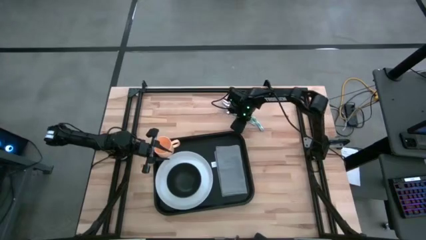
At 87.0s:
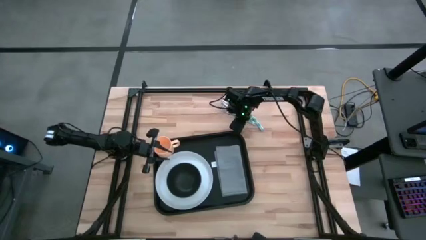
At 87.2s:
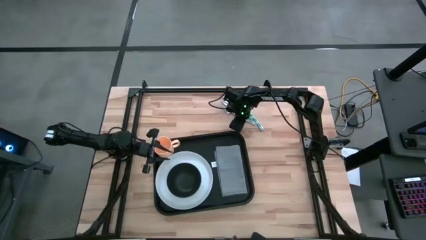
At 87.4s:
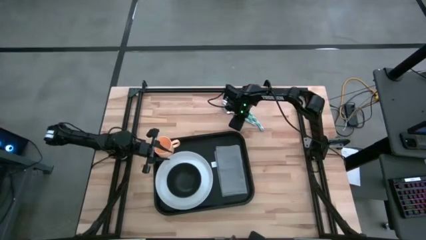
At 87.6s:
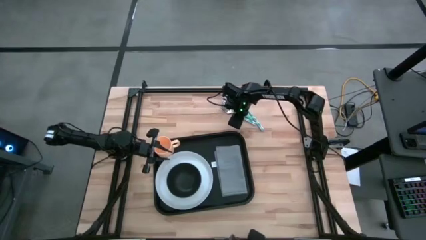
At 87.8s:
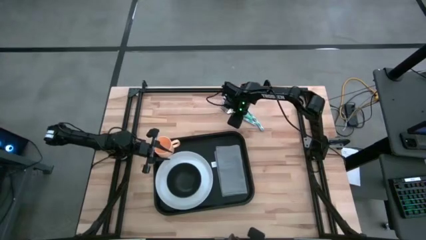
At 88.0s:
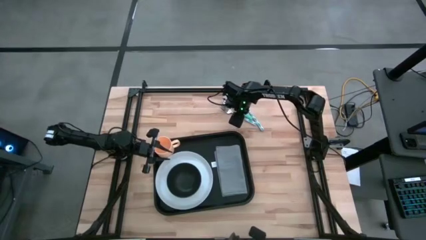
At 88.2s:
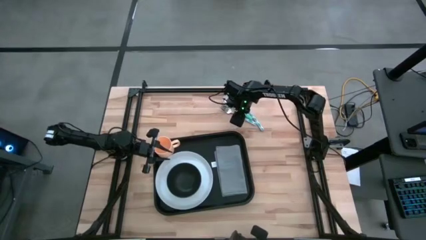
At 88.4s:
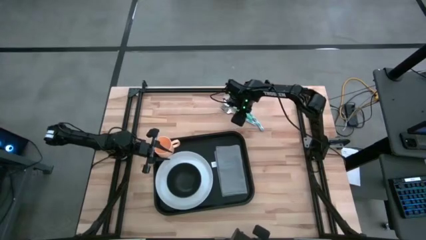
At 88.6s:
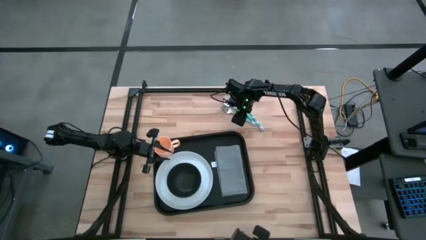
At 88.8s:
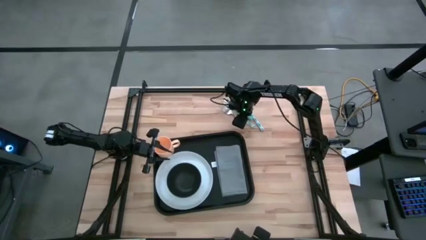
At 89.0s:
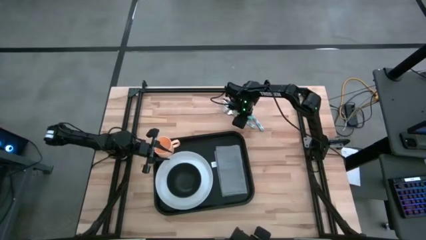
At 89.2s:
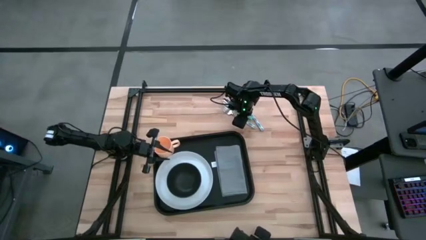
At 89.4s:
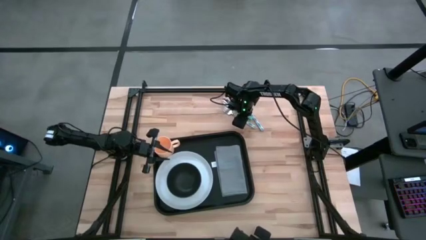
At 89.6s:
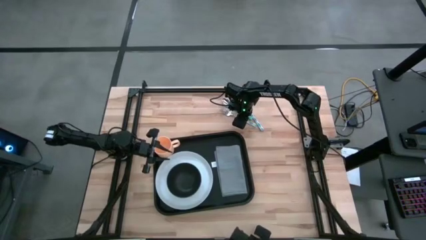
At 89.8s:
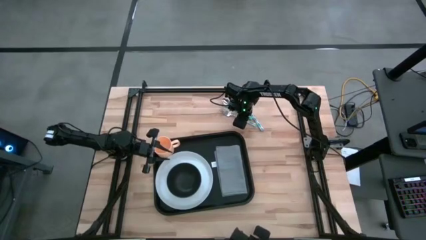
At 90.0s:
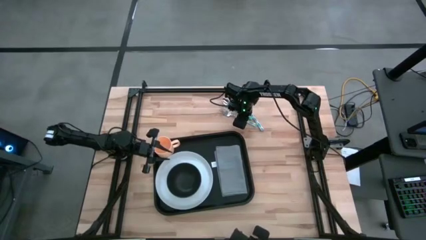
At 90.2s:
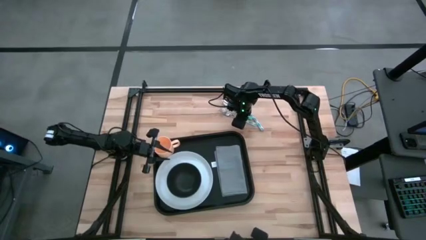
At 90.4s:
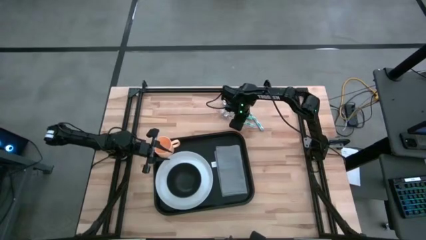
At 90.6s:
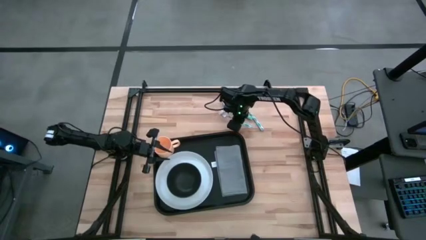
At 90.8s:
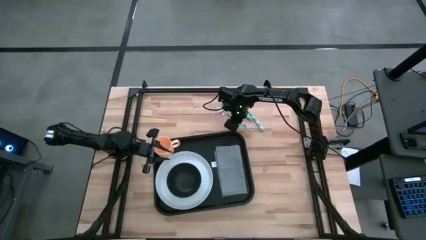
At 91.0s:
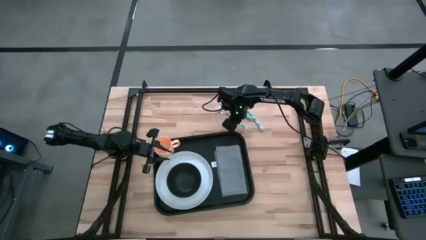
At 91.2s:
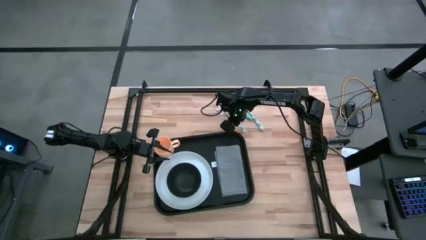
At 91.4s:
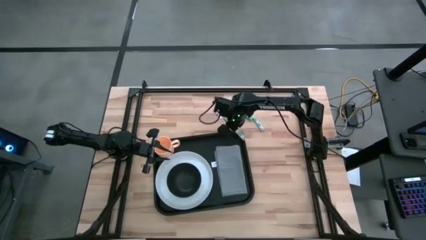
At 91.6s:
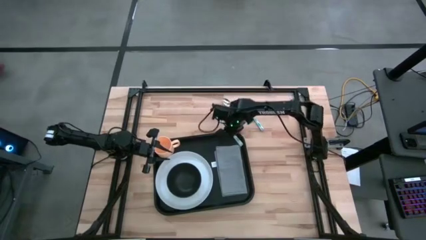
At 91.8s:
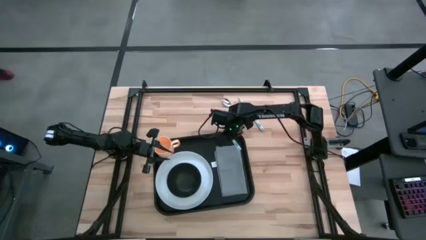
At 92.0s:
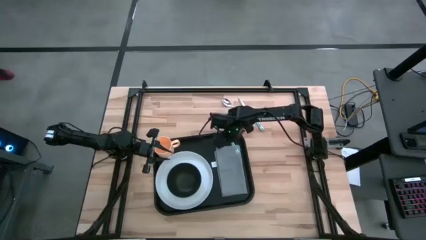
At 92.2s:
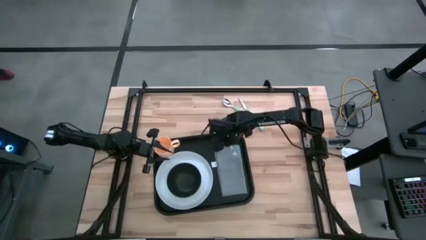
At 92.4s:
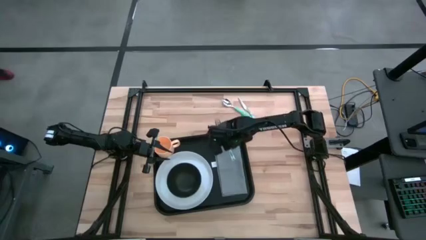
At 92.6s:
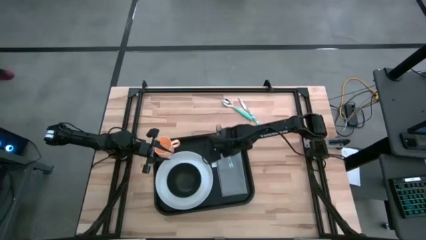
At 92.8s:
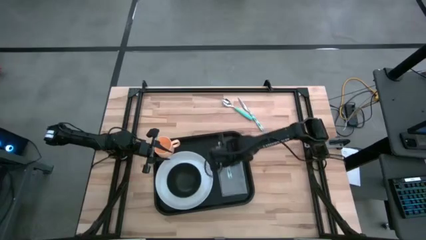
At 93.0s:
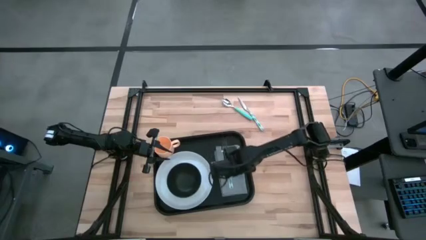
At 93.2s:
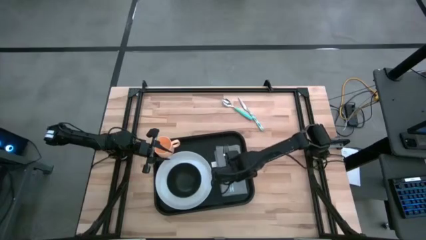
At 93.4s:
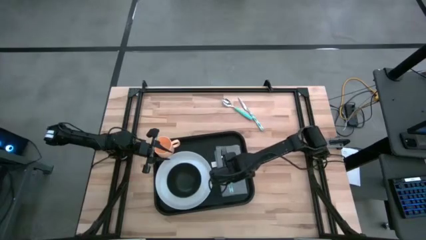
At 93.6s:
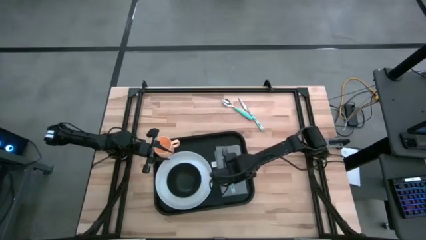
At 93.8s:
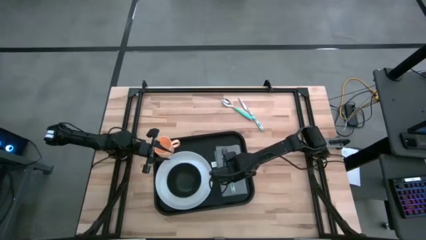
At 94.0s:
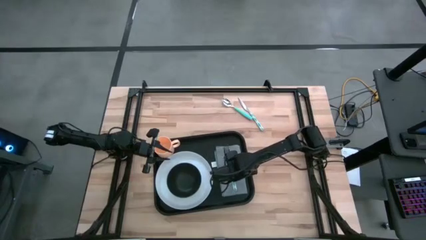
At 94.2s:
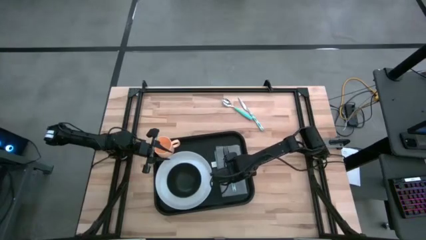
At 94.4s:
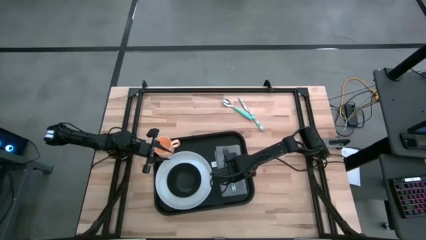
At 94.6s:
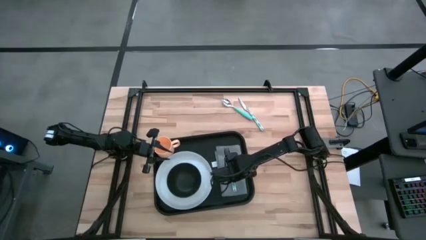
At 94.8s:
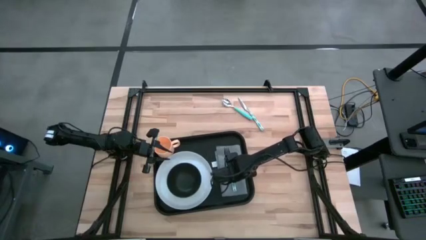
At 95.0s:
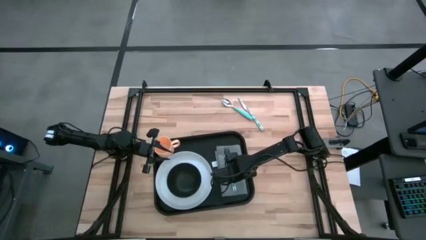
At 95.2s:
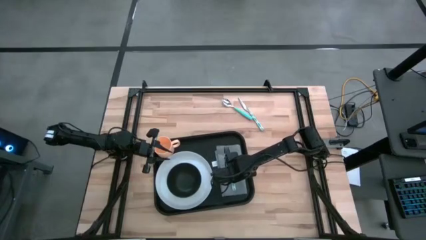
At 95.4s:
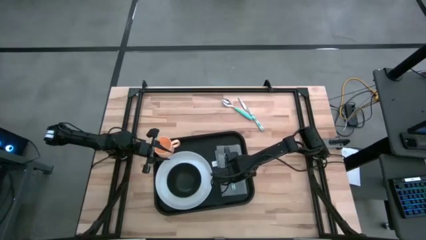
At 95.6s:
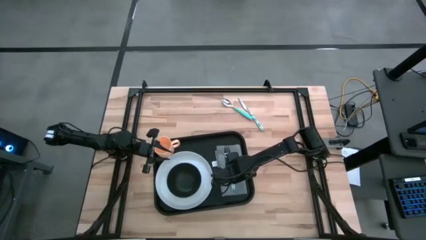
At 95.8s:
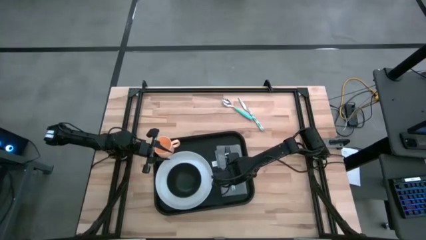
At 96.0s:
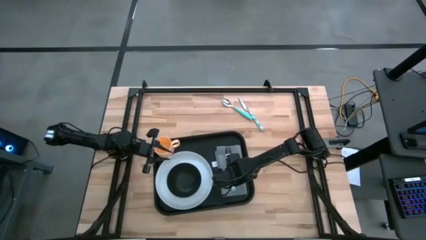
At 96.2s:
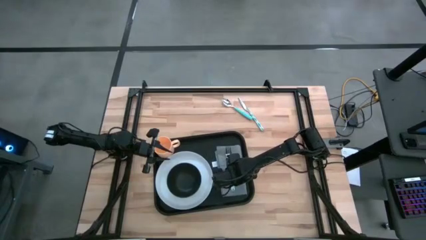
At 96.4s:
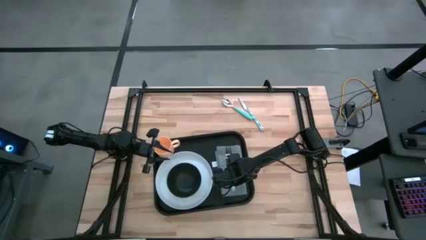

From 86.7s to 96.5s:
Task: Set up tray
Put the green patterned fork on the gray napkin

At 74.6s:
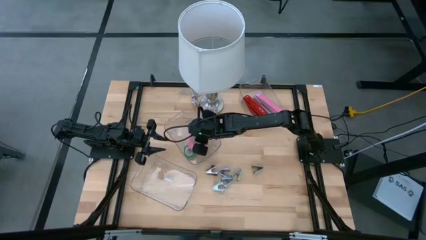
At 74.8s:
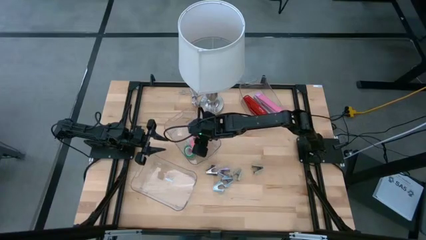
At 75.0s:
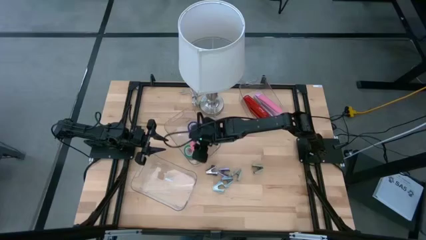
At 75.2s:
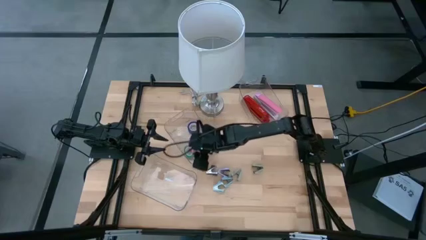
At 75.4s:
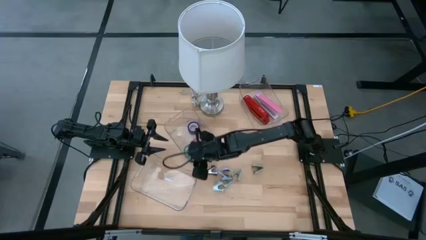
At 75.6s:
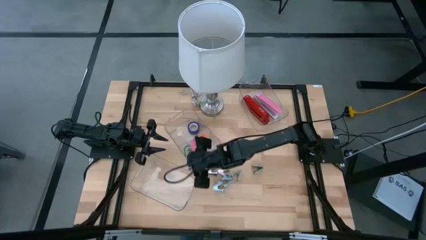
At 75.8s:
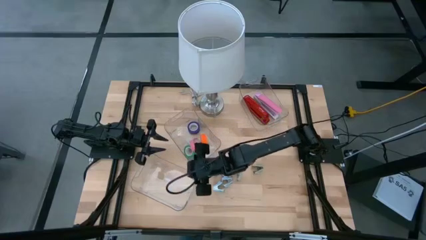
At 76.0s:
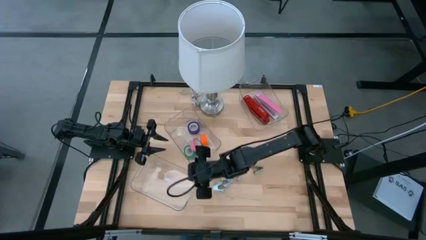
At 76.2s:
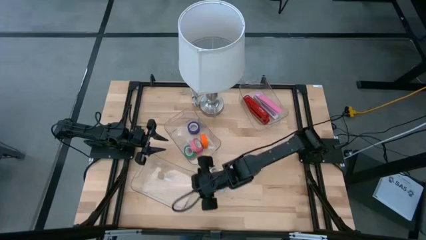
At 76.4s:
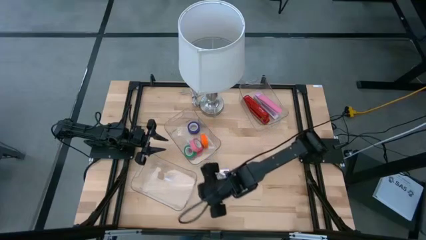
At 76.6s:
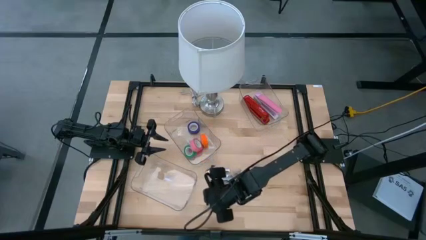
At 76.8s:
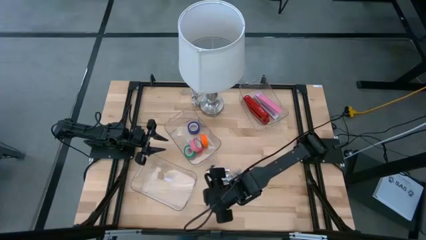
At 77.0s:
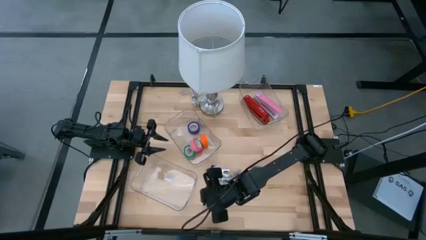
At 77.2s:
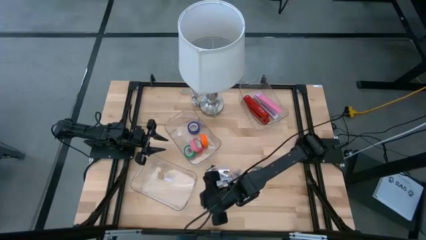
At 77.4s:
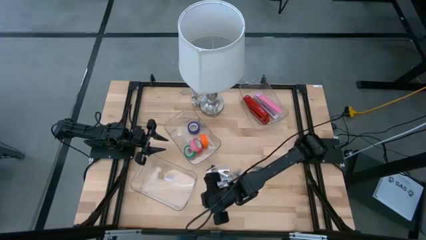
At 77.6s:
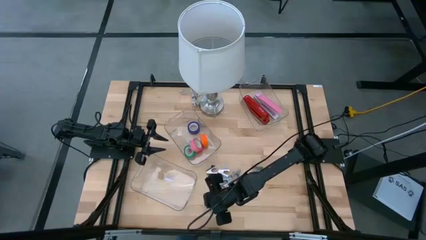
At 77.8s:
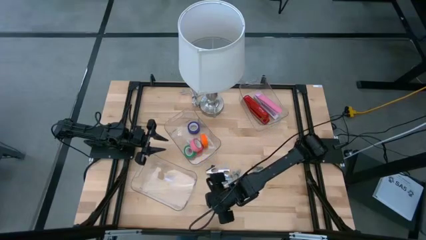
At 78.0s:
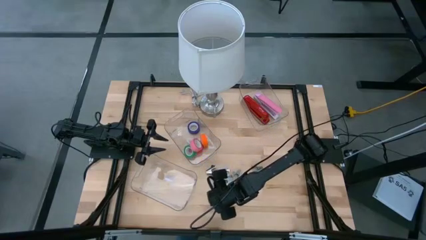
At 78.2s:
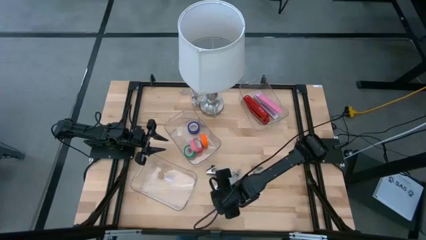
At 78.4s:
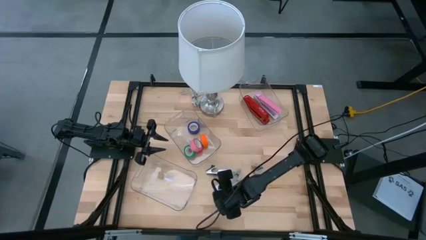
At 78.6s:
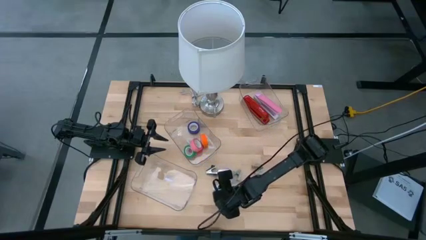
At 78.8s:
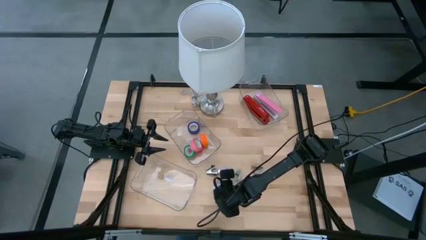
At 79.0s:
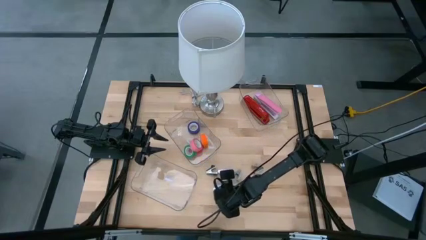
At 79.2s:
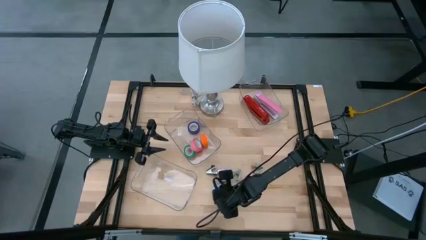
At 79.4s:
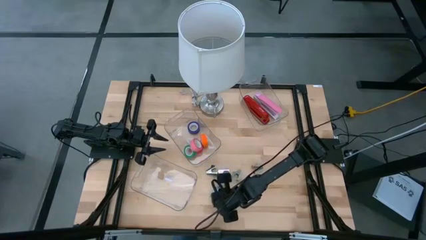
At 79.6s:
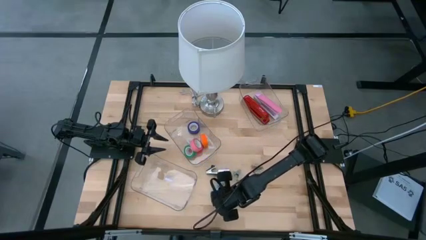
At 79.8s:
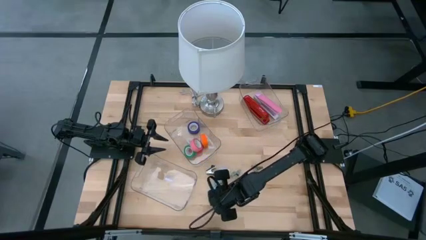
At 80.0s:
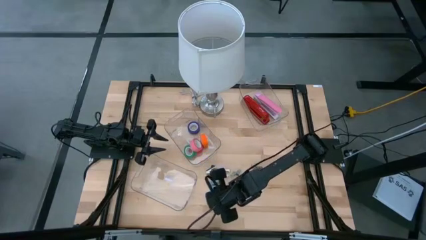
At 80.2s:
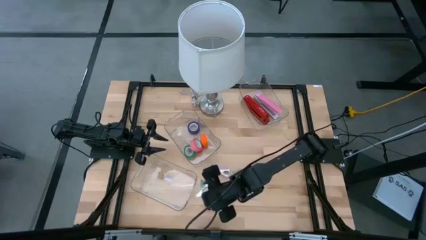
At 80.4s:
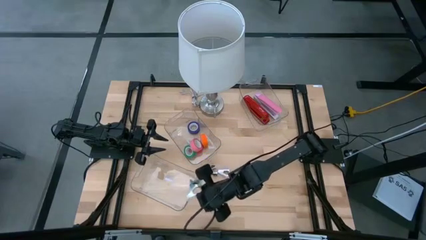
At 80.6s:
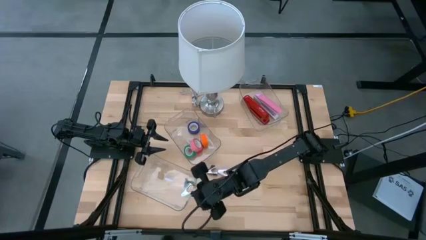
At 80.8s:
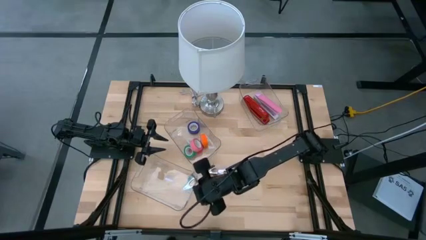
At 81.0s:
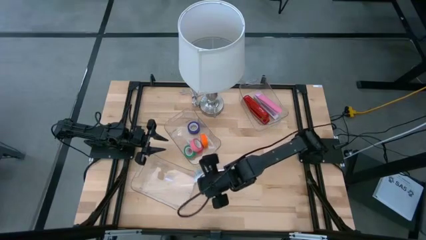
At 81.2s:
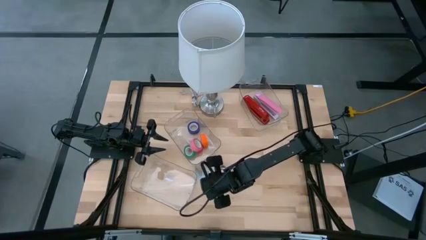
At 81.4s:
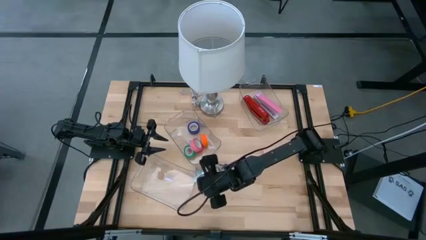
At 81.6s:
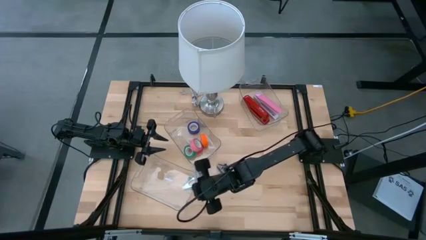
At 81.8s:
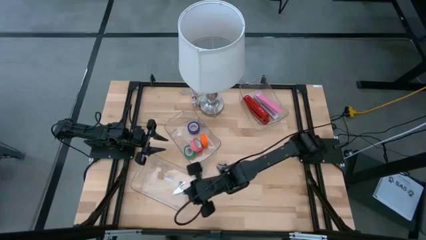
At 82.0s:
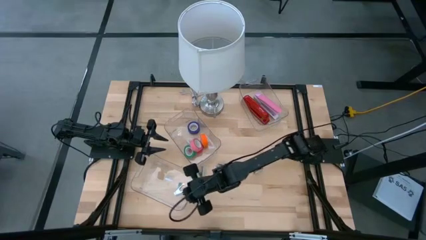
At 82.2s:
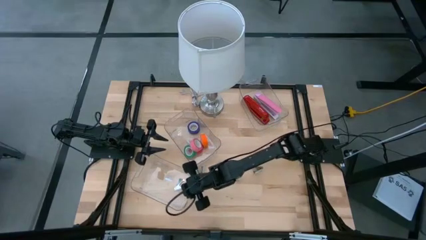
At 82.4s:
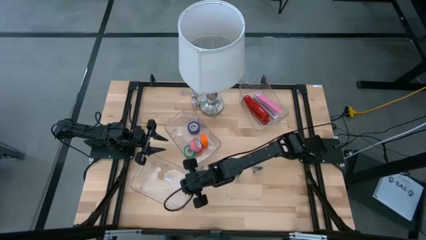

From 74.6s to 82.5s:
Task: Pick and place Stapler, Stapler remover, tape
Put the left blue staple remover into the bottom transparent bin
